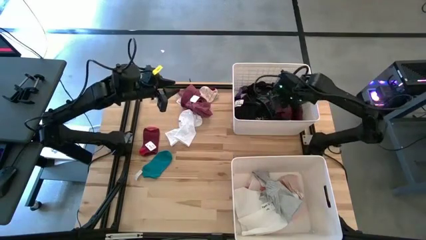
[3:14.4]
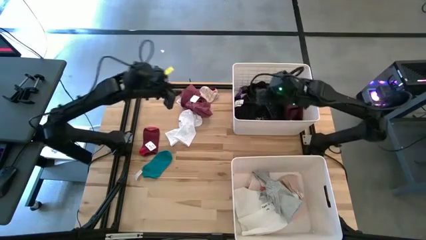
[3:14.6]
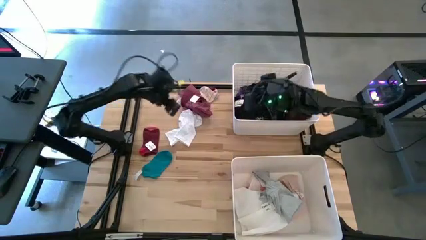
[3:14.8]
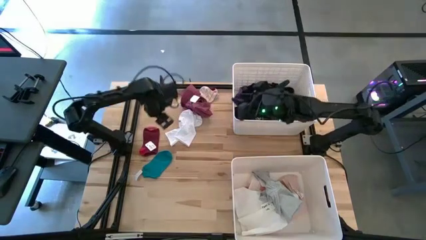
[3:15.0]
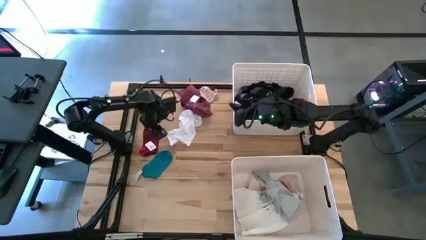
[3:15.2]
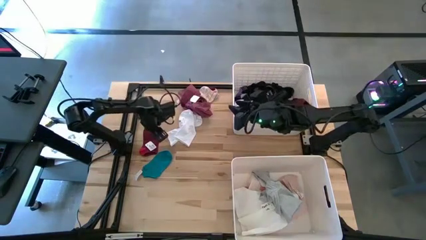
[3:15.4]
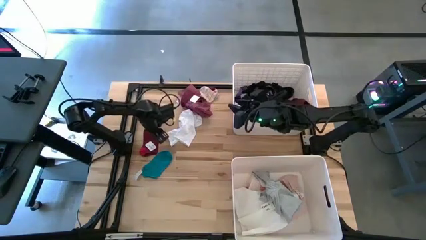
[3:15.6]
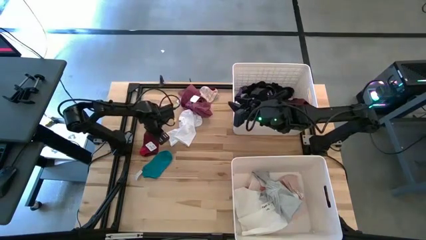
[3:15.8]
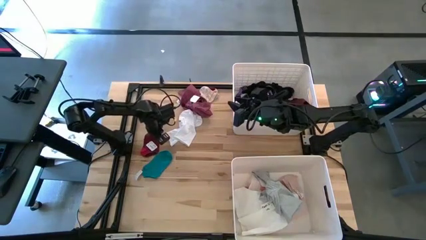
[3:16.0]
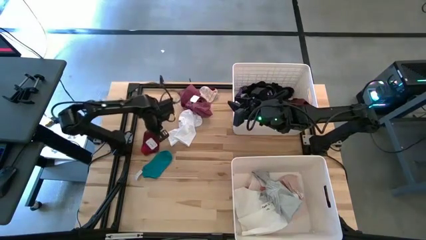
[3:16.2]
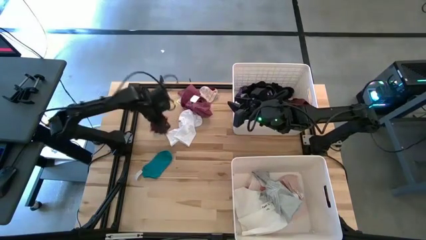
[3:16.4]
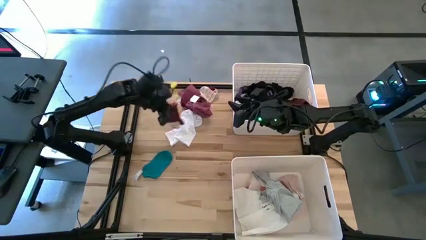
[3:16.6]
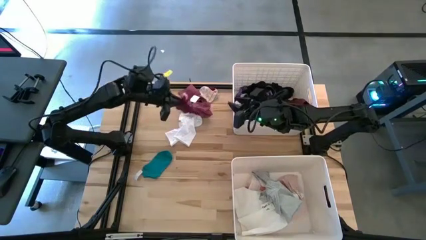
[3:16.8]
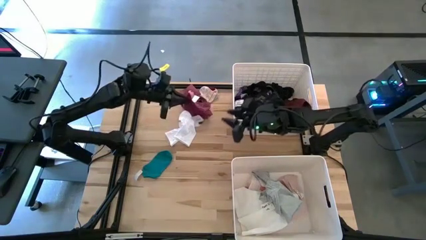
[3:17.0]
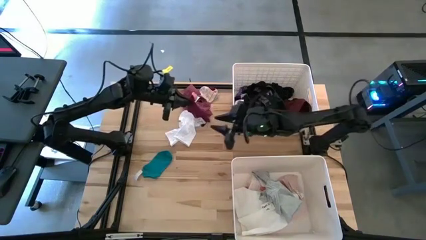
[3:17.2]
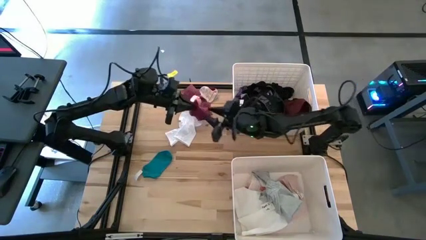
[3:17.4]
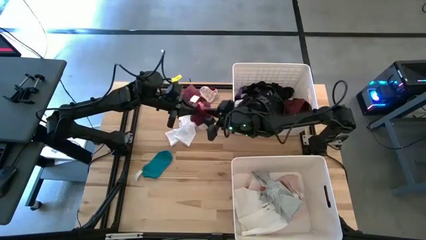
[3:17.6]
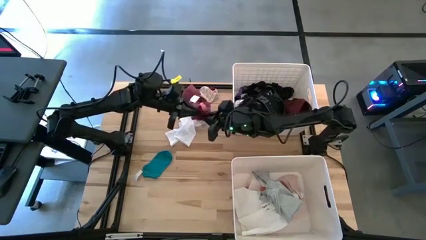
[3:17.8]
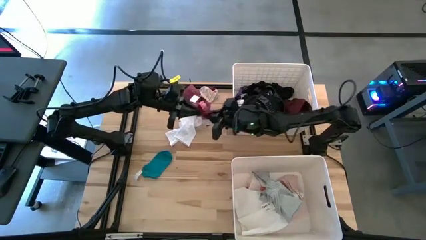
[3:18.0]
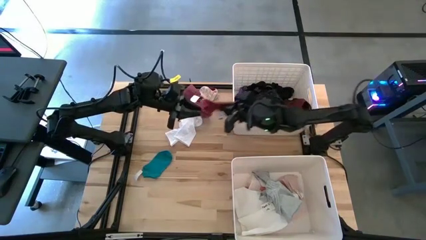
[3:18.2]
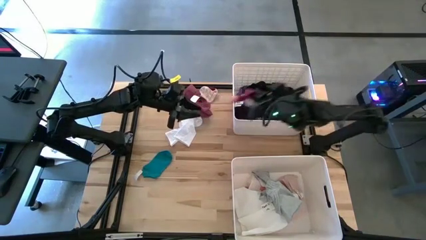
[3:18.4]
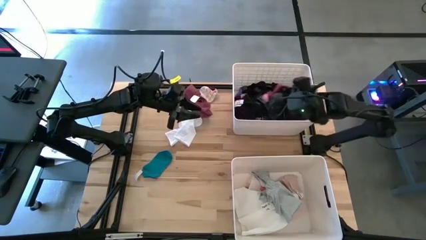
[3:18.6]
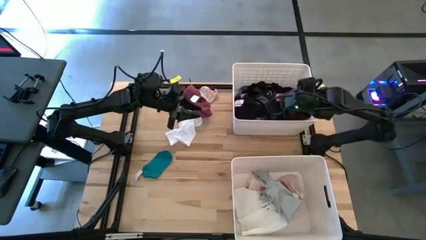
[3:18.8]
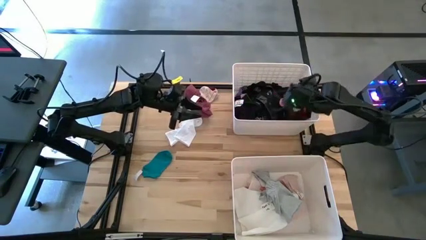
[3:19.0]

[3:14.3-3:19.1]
Task: Sort clothes
Put the red sock into the top bin

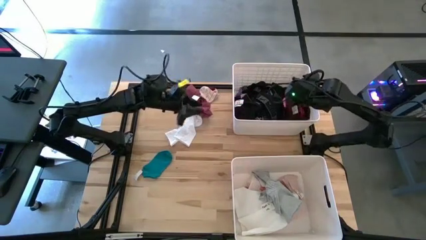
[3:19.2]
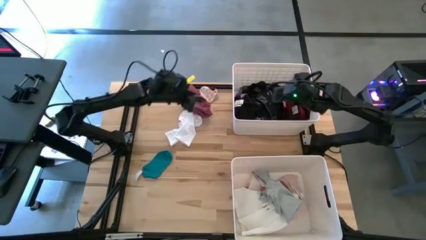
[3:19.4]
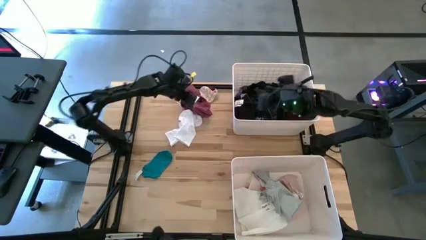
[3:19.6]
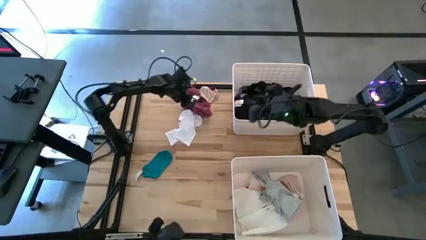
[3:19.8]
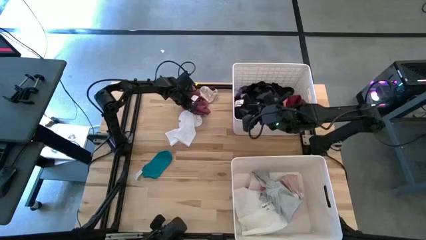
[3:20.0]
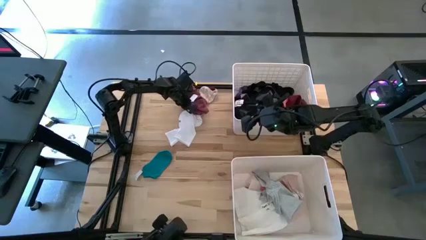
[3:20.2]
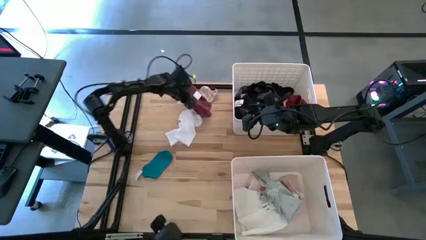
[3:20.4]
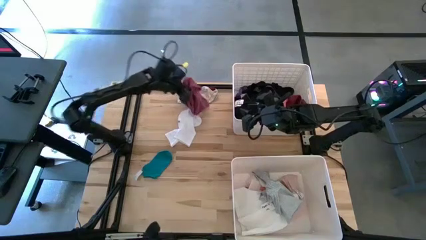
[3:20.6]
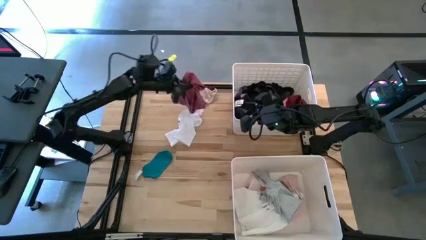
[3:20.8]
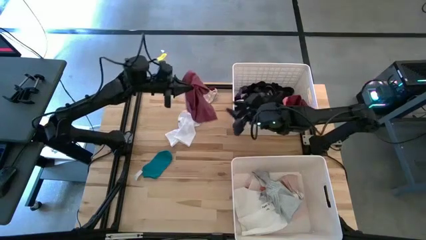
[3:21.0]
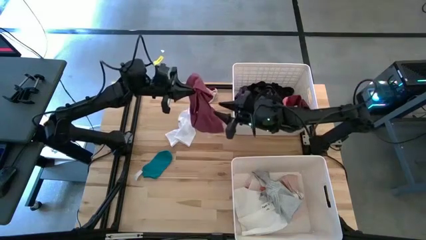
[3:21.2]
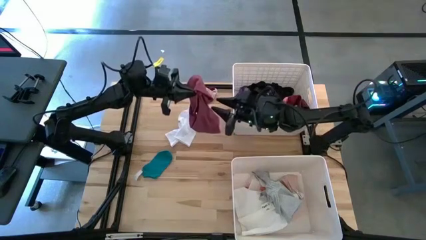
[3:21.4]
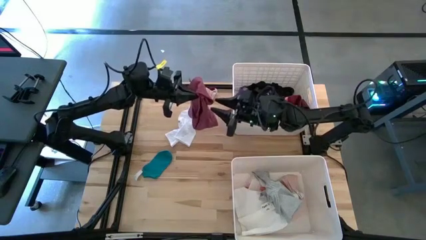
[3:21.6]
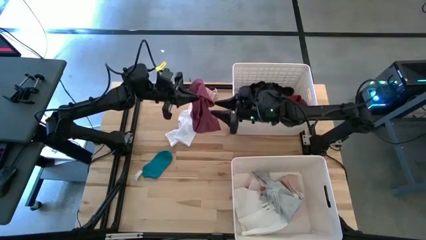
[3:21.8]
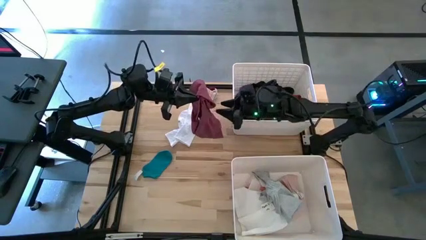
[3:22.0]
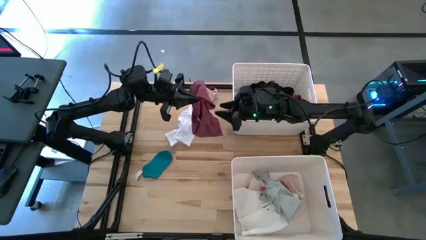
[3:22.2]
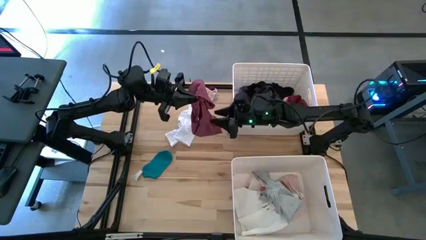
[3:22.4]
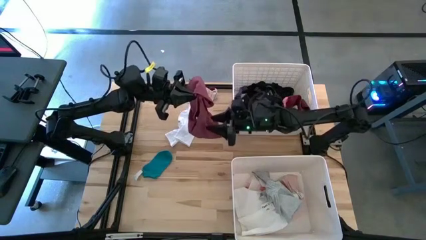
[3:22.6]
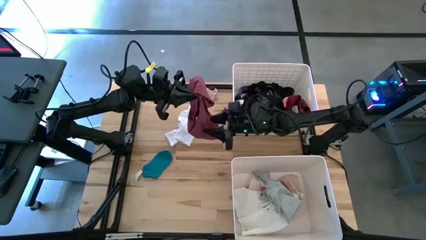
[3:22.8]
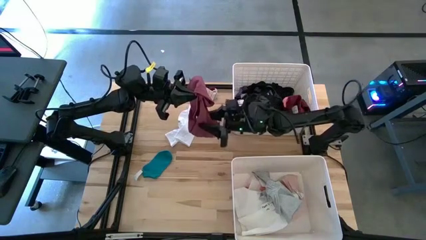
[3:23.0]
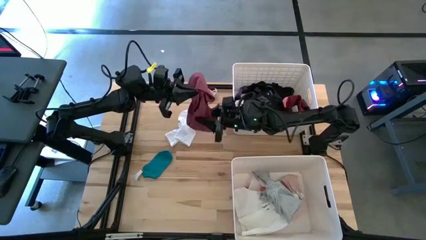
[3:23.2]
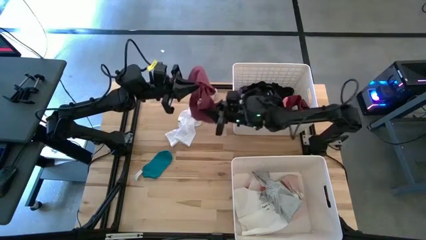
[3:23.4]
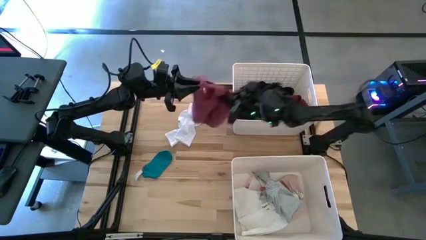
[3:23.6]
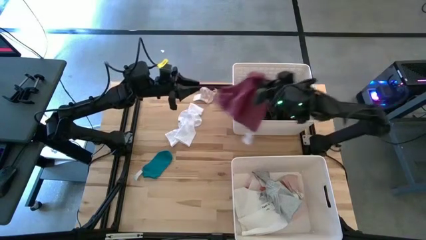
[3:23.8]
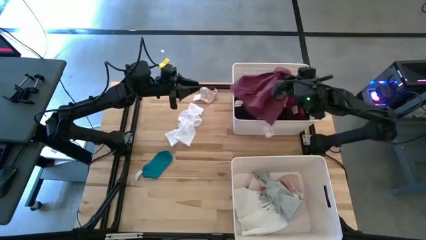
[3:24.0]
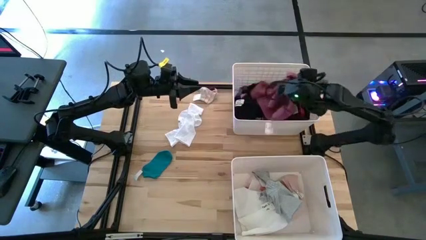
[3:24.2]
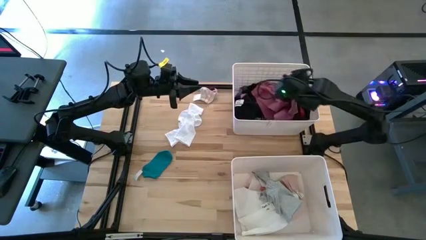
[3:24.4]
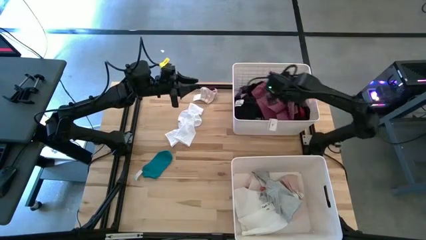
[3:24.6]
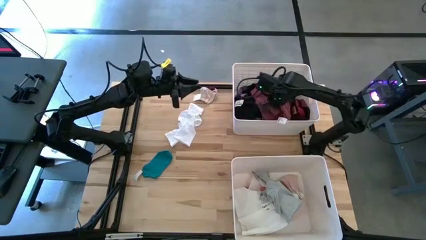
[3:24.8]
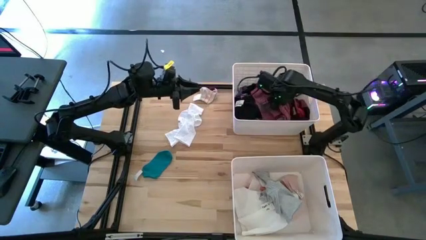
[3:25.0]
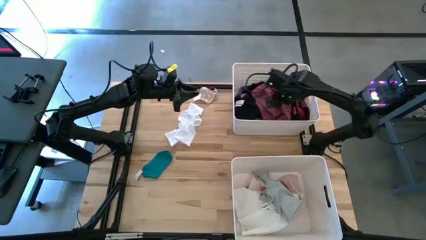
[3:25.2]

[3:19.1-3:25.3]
Put the red shirt into the top bin

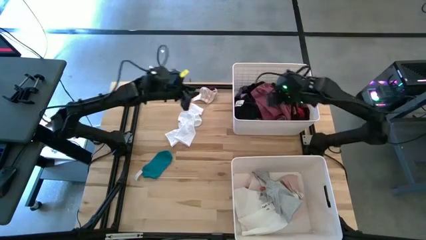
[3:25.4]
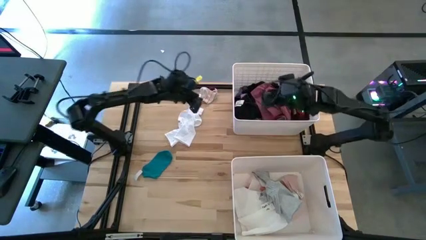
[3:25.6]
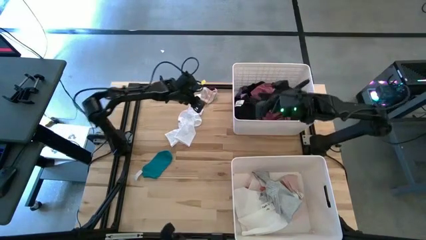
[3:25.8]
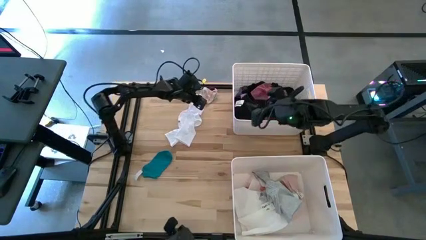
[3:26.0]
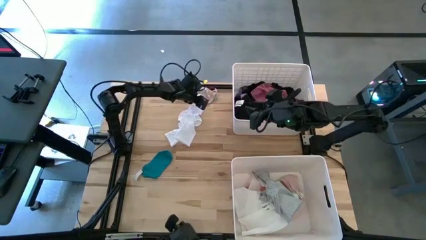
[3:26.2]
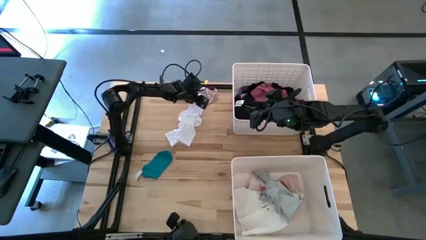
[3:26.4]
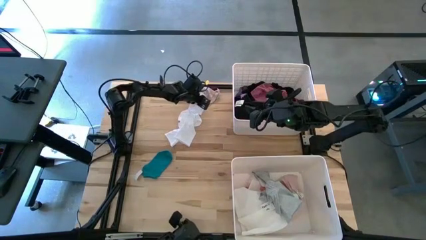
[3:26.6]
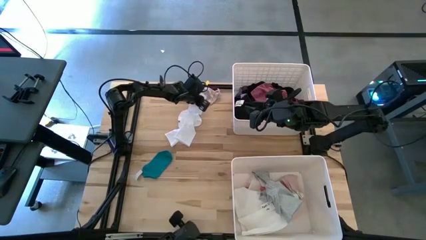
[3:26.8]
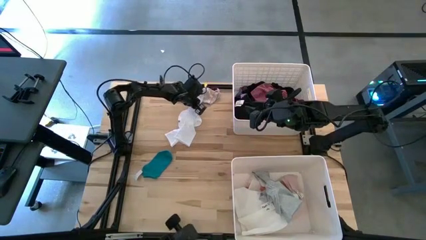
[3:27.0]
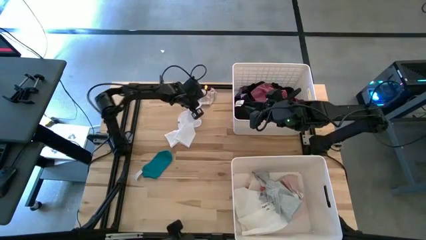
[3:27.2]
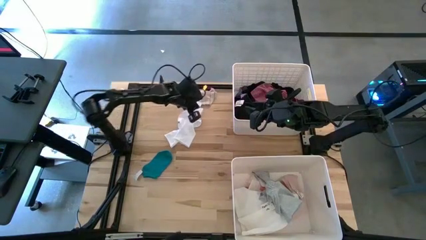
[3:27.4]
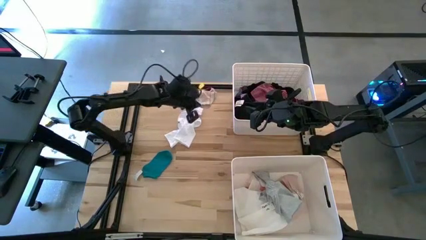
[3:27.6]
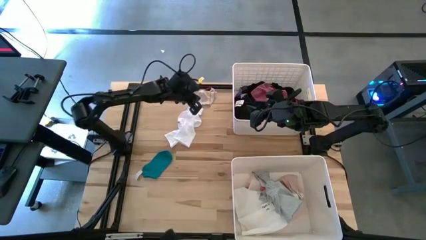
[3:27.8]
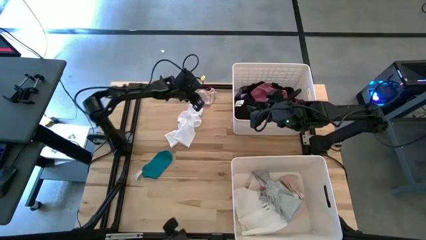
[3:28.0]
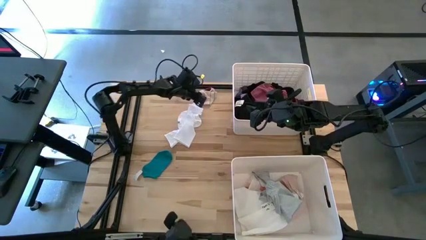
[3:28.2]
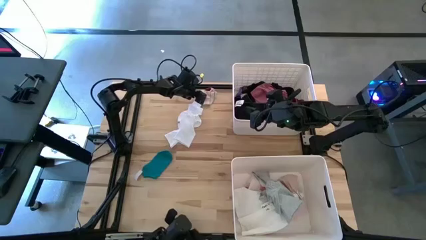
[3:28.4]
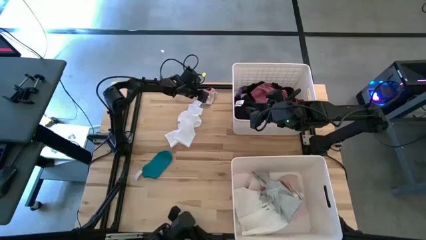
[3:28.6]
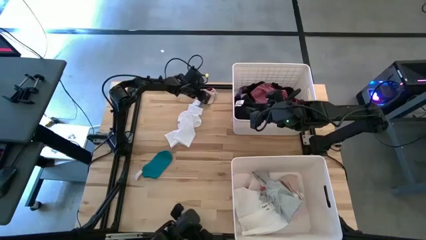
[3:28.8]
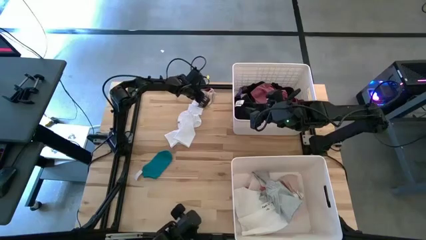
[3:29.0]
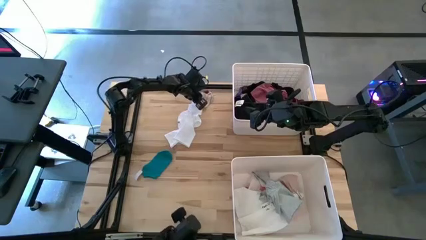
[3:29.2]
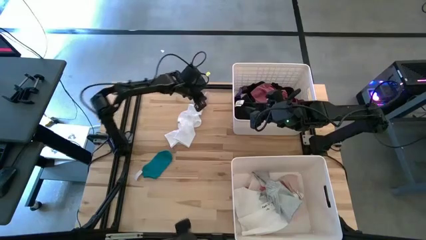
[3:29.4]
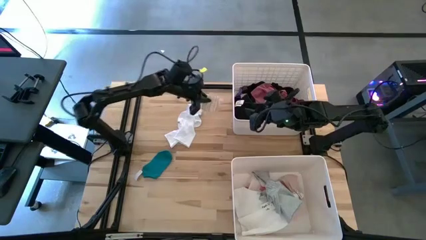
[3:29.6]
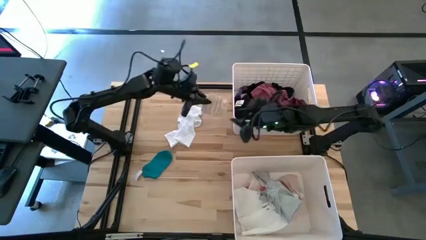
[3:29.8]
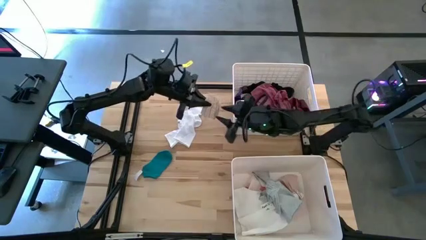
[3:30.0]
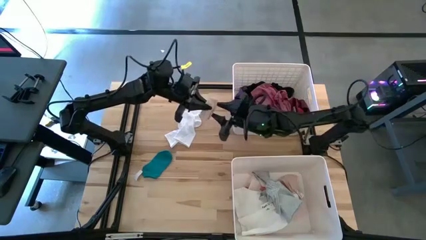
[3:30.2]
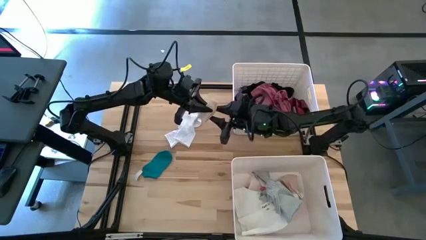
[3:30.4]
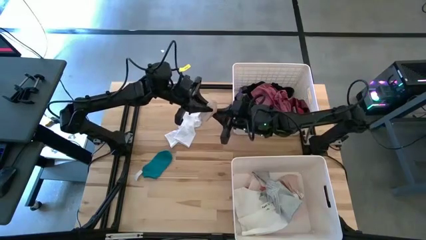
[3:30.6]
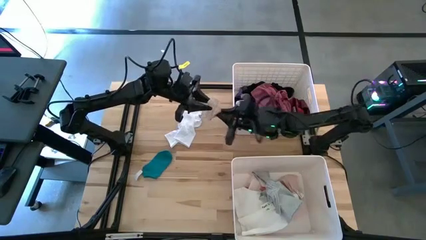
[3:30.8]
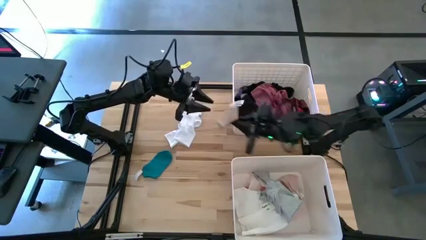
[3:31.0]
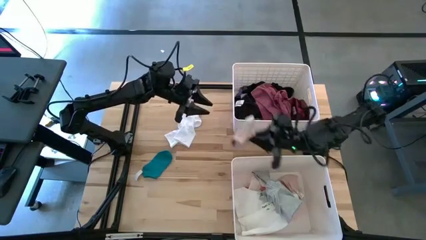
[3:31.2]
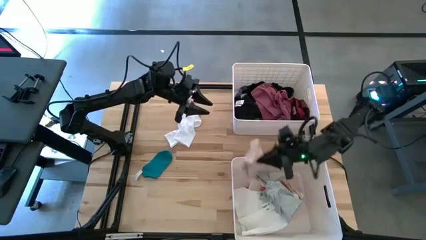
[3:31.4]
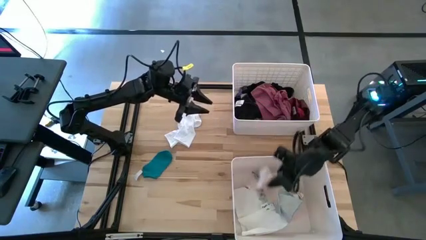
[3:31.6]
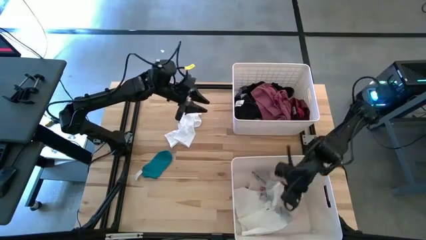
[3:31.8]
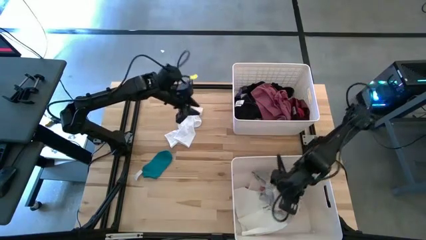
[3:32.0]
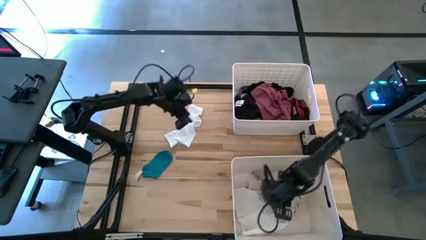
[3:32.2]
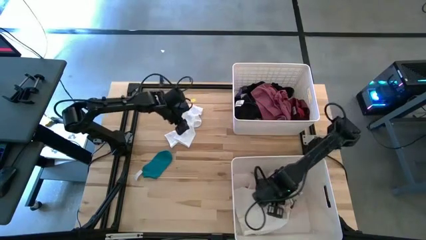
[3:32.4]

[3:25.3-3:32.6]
Put the white striped sock into the bottom bin
